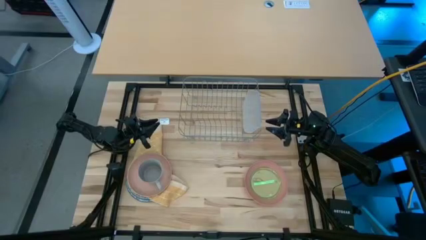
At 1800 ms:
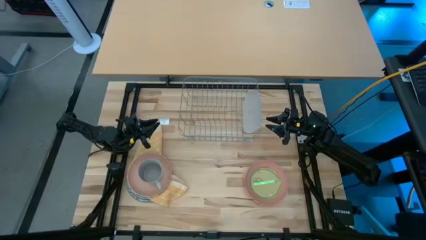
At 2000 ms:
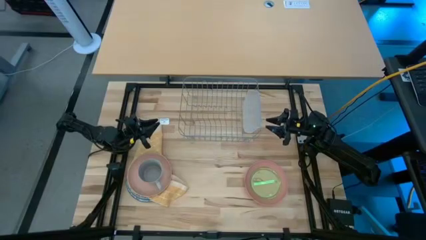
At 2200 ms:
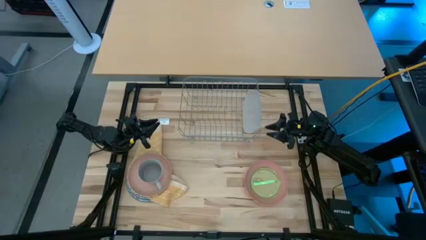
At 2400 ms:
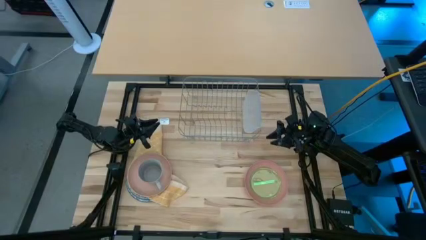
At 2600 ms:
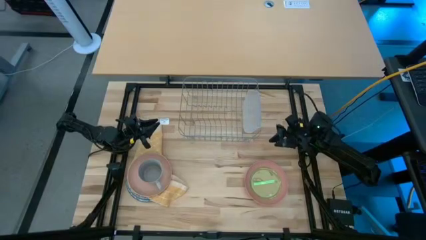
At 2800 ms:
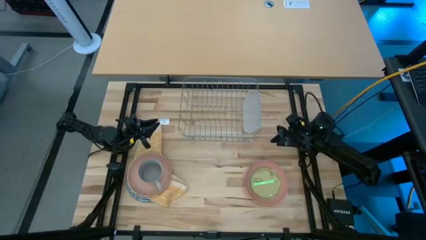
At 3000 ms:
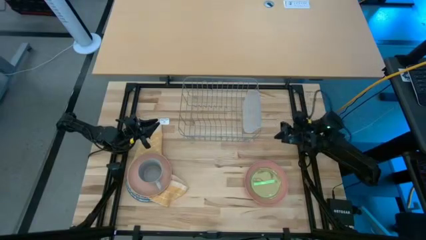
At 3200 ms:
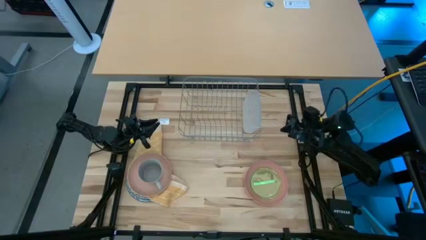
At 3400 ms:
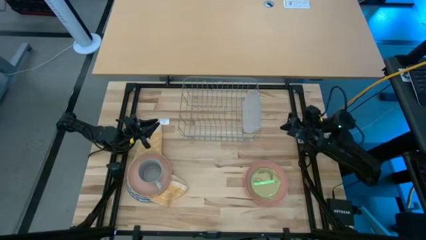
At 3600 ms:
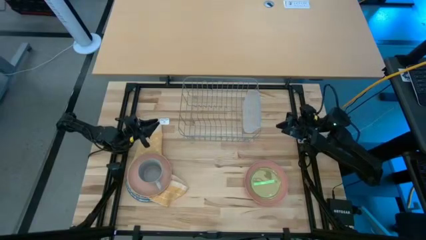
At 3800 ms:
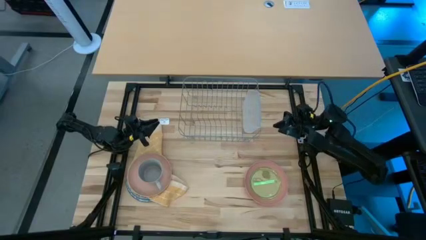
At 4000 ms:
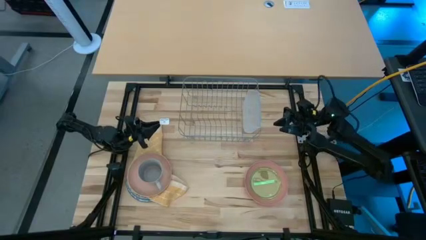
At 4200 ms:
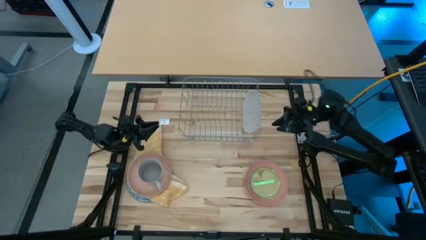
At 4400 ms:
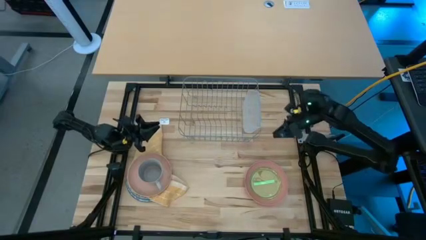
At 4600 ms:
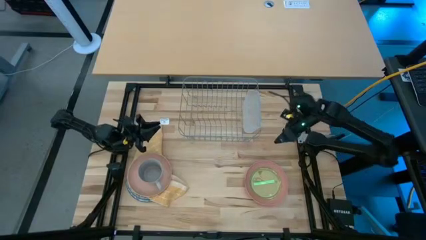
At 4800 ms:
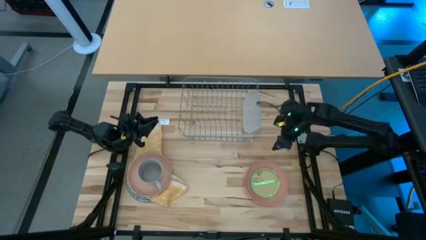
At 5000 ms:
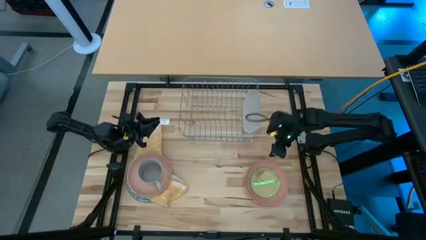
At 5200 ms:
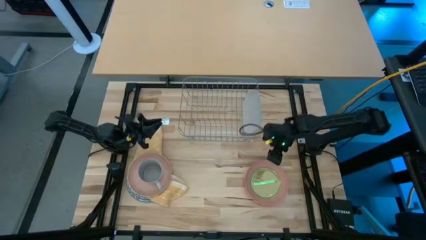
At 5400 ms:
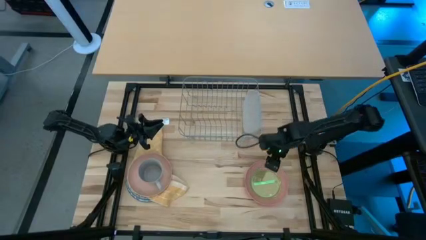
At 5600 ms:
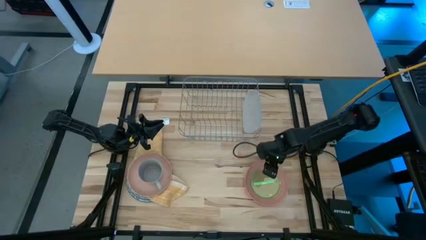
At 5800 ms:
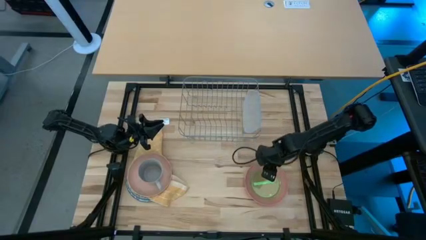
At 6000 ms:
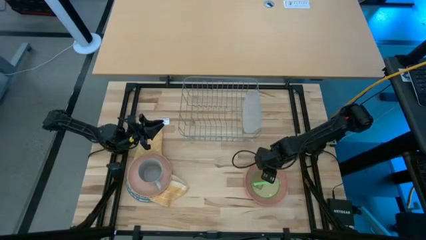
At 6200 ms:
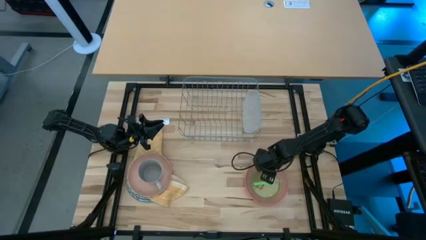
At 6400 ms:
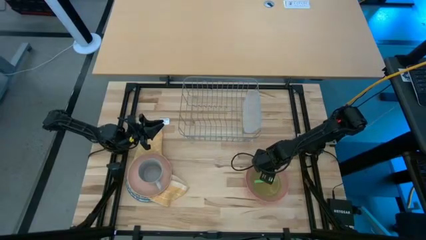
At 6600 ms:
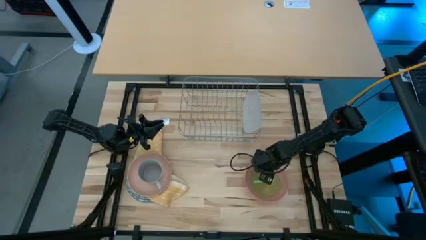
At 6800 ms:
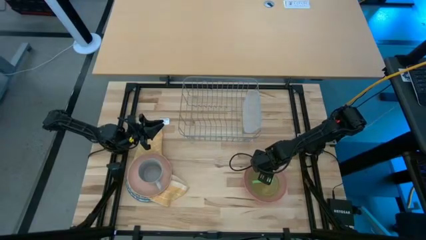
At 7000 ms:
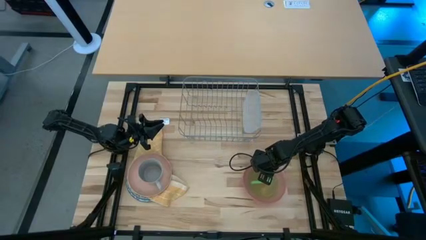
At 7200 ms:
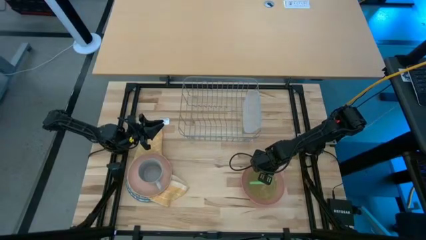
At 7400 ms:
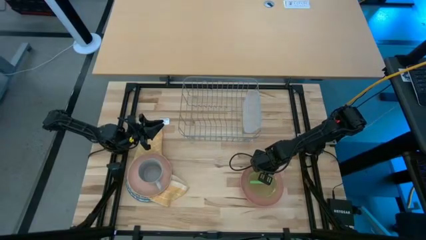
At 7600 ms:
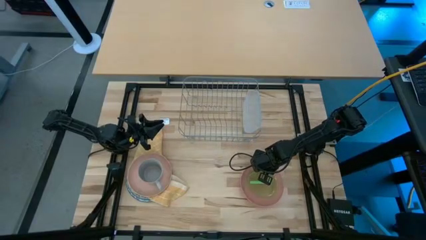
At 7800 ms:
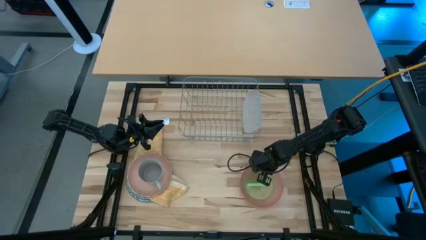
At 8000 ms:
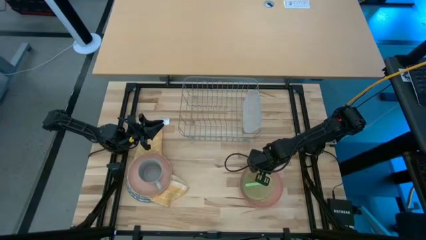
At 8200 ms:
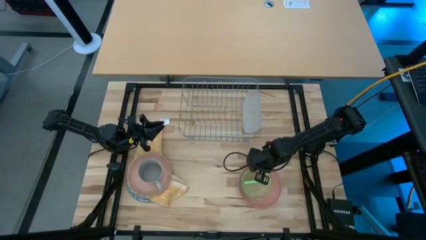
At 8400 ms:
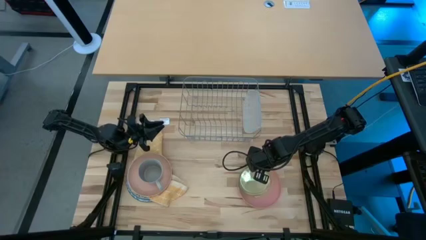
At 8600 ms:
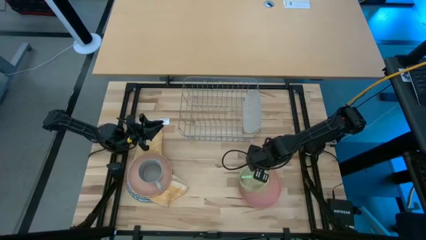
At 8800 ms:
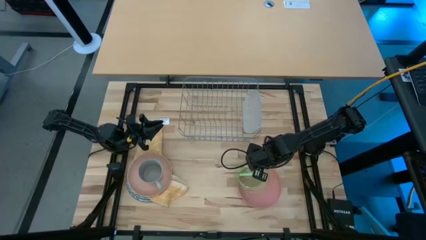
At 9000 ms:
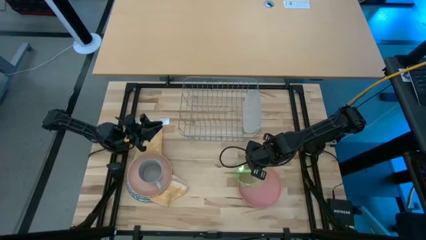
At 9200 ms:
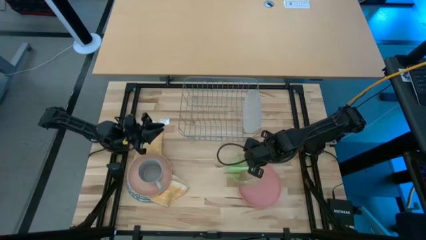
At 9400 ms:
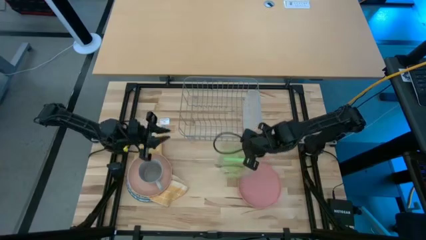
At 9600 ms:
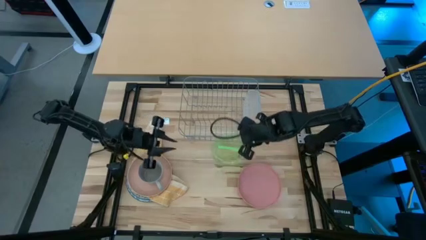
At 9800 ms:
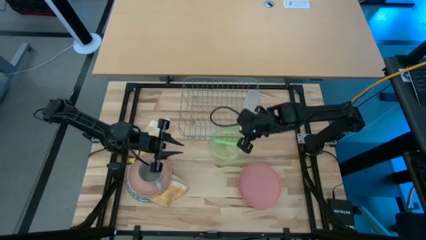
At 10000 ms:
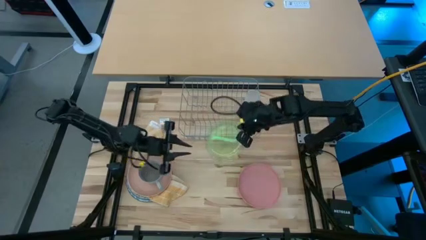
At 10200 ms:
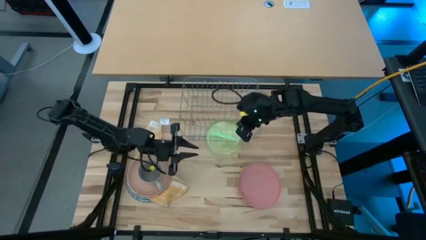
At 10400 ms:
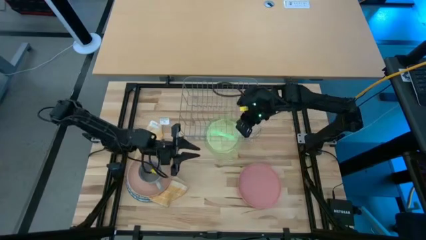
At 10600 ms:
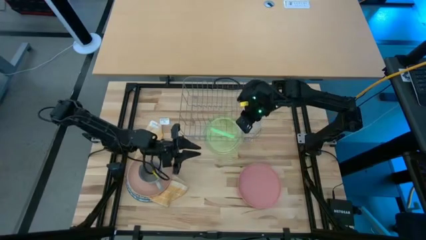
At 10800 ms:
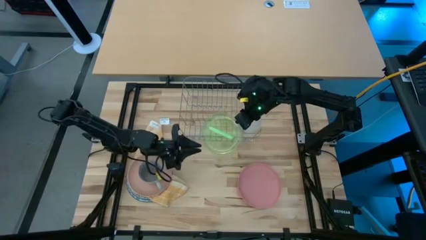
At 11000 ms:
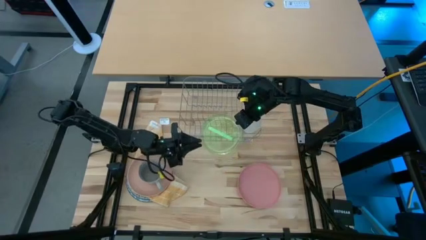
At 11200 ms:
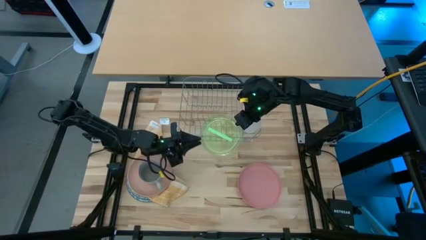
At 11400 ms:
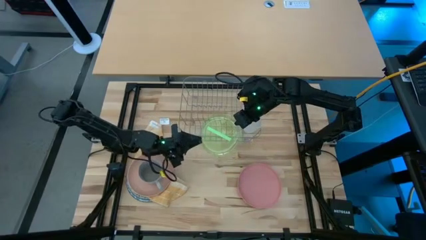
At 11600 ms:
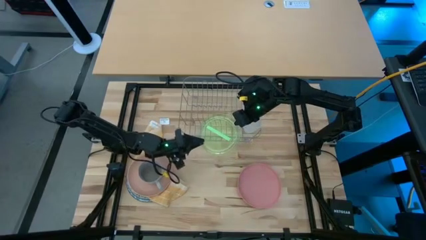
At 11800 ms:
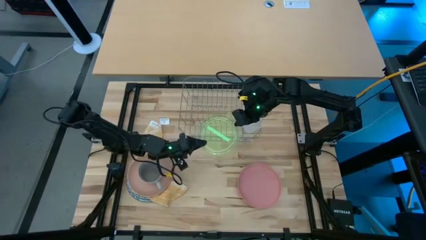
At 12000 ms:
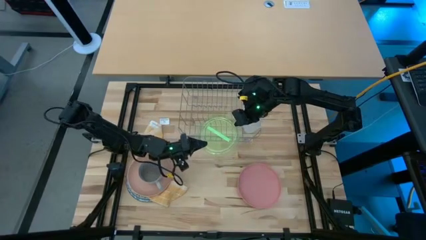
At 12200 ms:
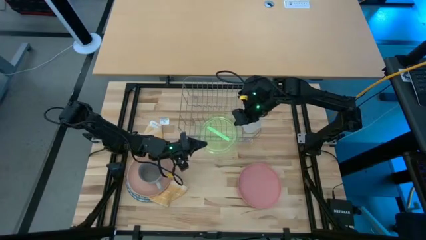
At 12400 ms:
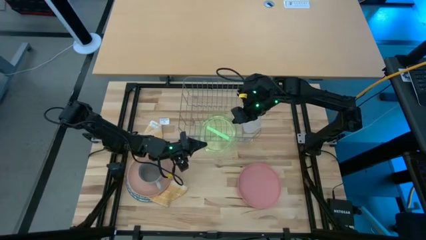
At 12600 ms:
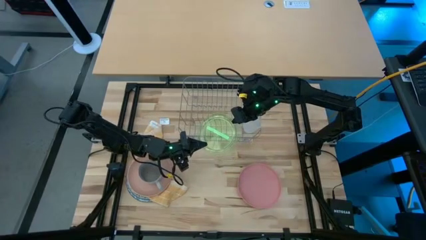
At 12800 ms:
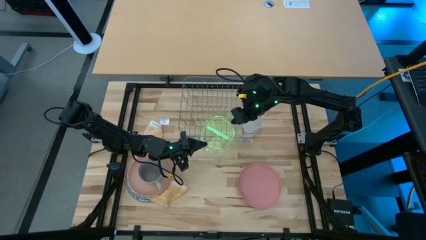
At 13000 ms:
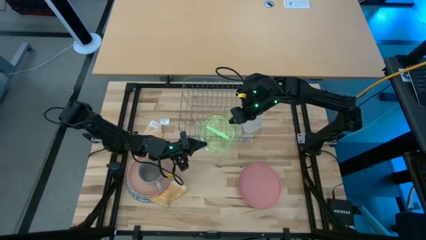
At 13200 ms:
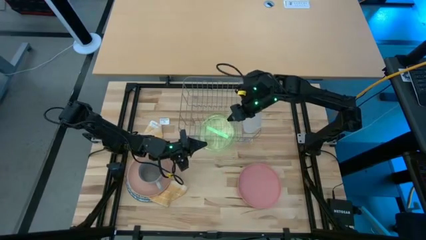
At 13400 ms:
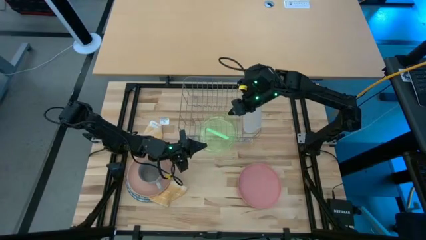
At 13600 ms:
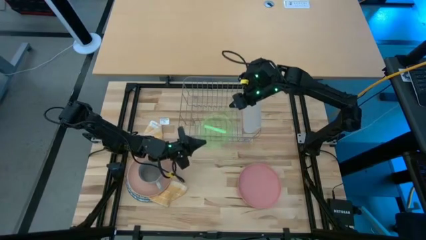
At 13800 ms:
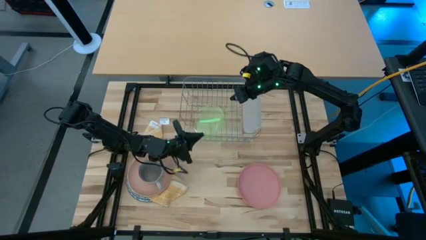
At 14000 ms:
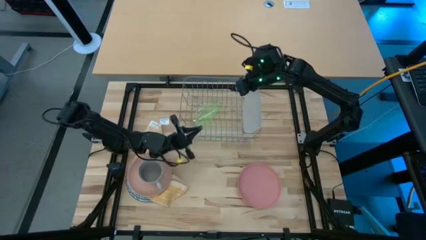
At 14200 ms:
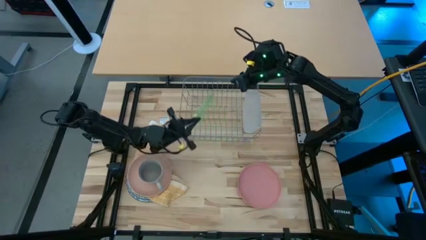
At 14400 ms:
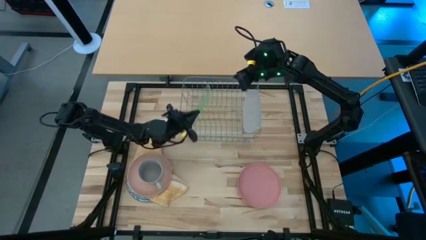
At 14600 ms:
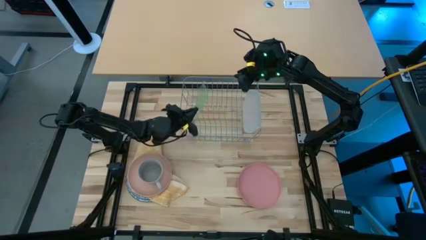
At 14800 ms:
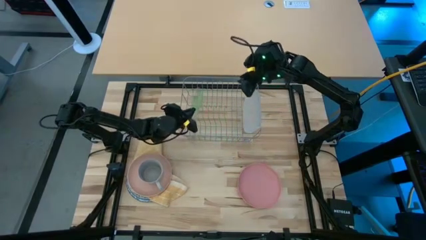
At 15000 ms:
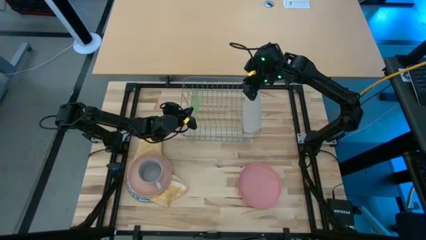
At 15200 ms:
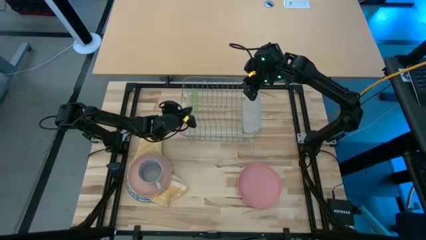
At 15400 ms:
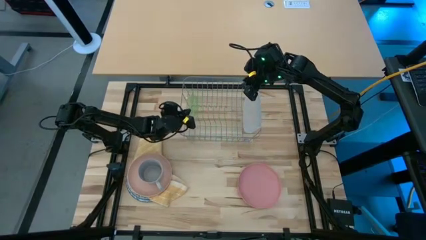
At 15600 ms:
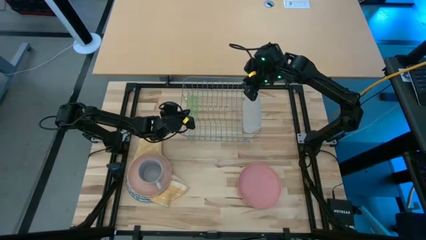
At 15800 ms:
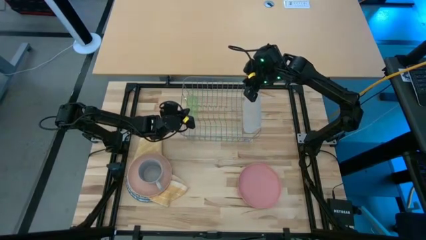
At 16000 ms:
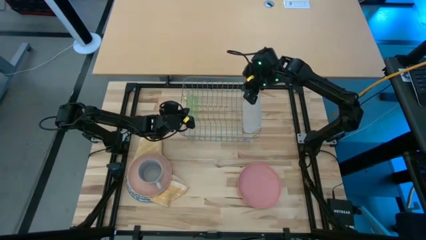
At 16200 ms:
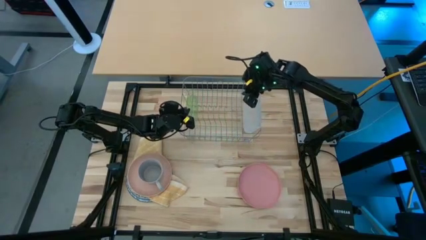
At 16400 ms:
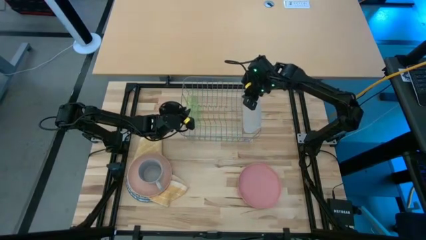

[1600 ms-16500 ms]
Task: Sort dishes
Put the light green plate into the dish rack
